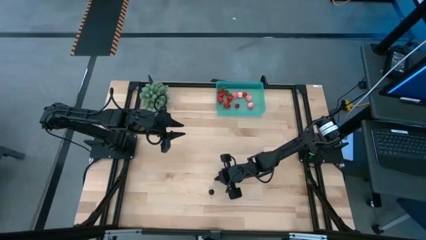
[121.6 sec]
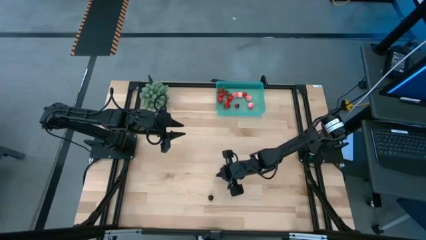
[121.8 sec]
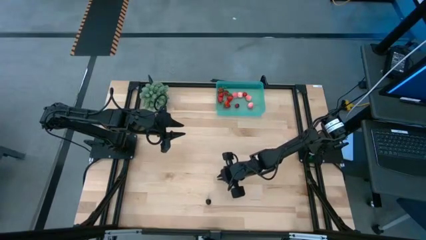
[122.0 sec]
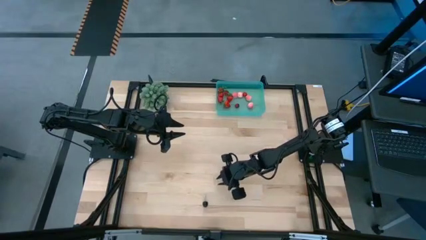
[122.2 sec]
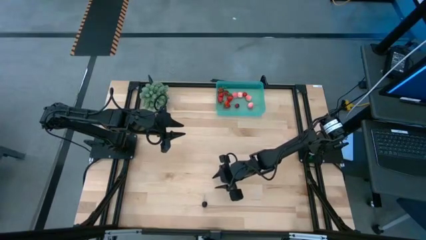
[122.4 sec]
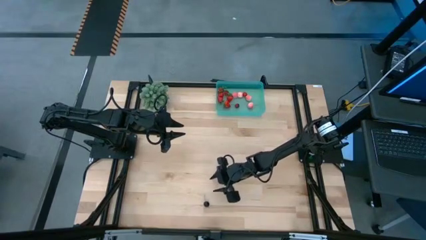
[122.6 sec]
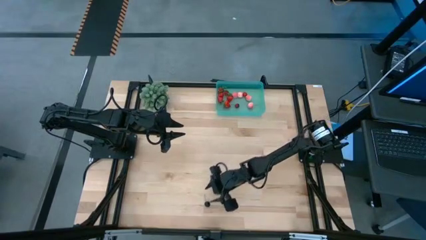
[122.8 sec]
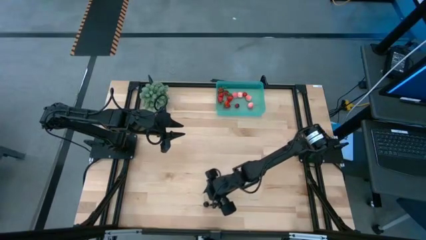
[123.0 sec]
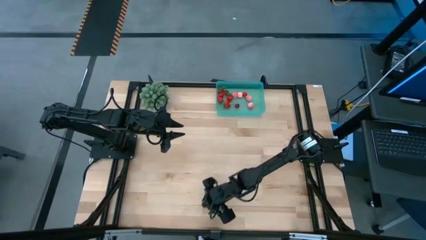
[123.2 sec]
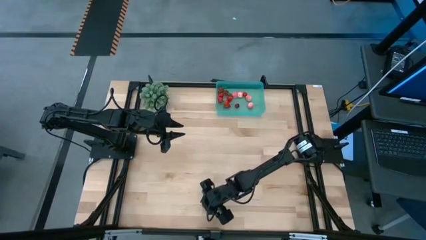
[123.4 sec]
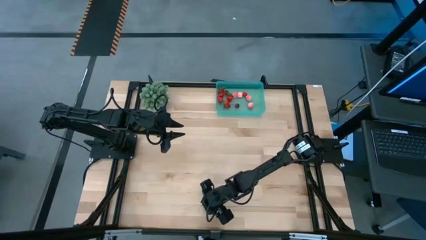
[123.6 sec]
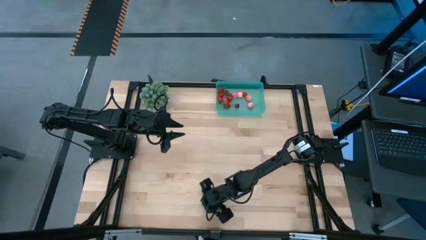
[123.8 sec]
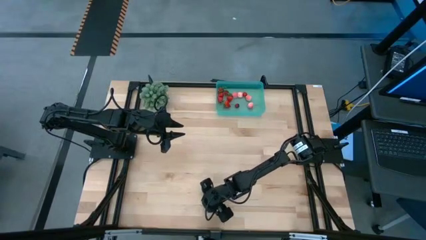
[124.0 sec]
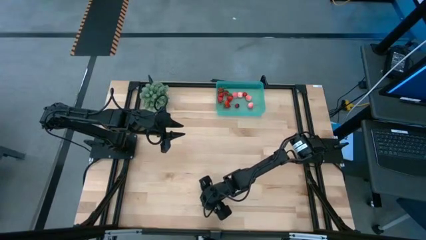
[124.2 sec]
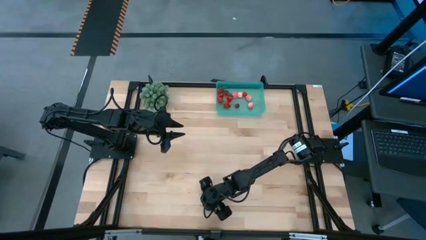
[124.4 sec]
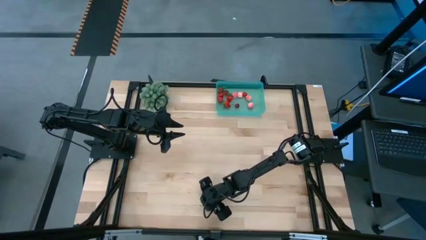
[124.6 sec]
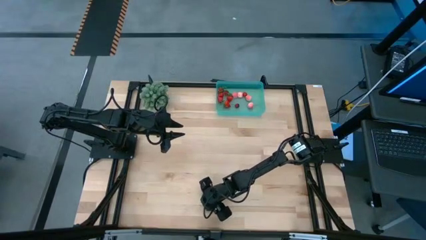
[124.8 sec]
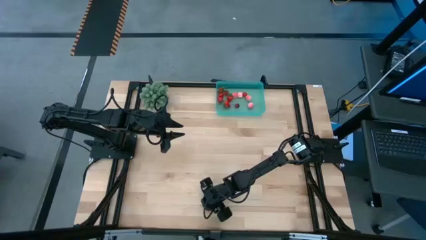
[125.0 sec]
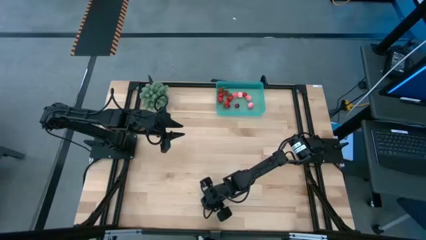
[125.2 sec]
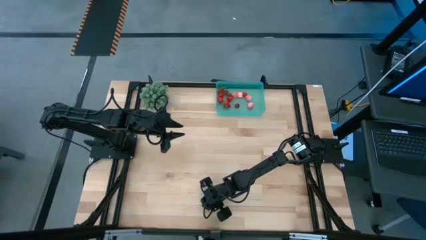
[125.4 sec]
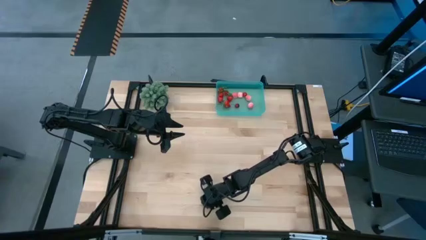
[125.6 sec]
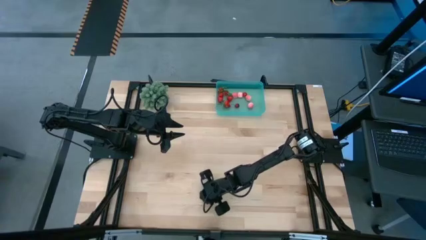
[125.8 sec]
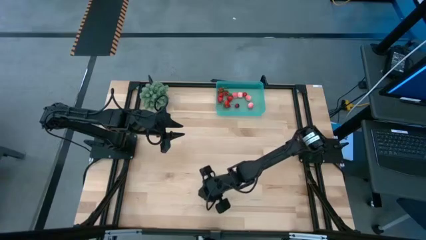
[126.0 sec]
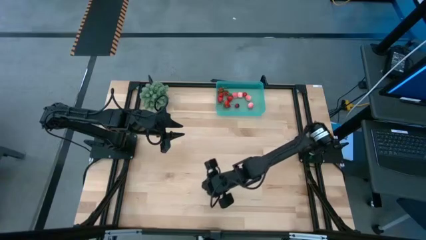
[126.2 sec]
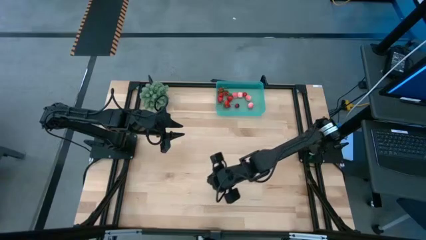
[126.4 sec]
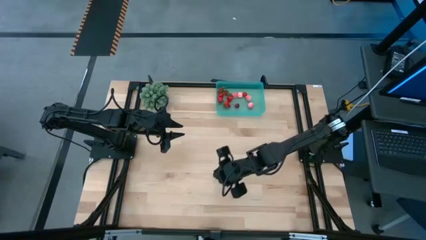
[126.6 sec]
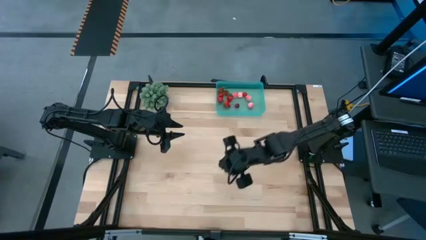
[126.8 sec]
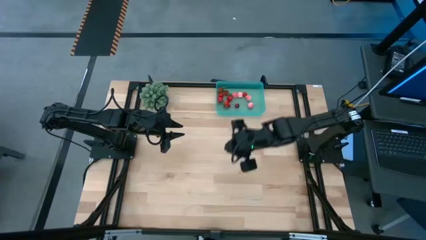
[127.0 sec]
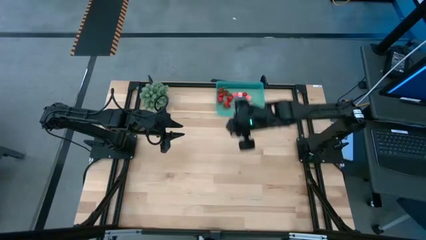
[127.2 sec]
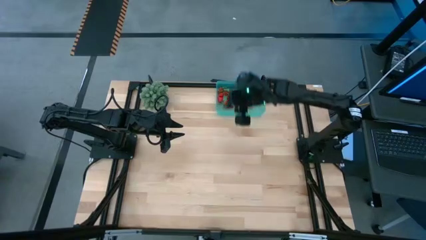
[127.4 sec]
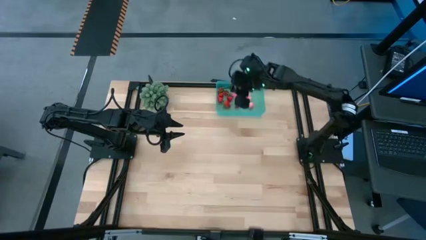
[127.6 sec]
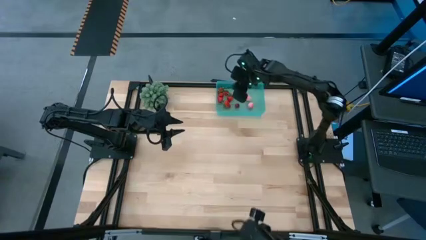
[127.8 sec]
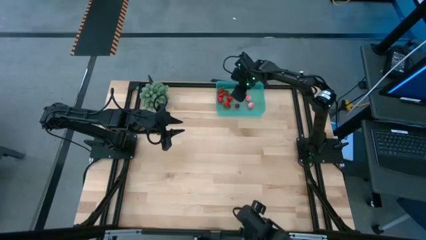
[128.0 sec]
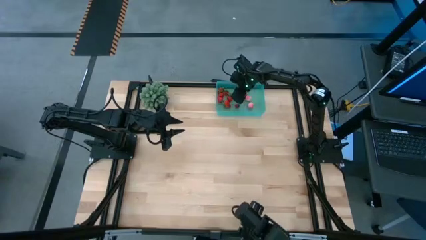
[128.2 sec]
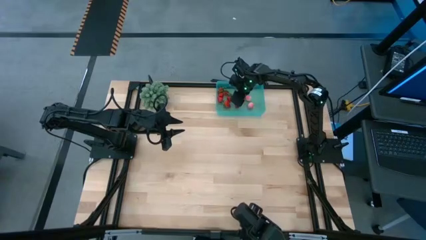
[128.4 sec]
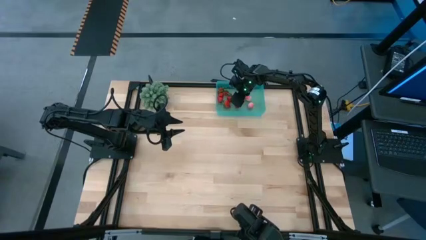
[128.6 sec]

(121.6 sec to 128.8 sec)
Task: Pick and placing Produce into tupperware
Put the cherry into the blue bin

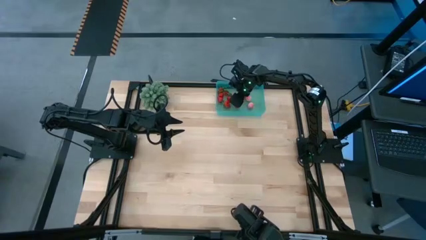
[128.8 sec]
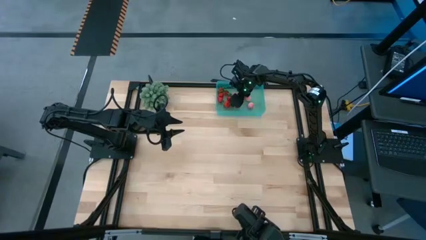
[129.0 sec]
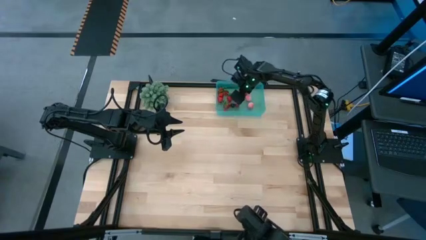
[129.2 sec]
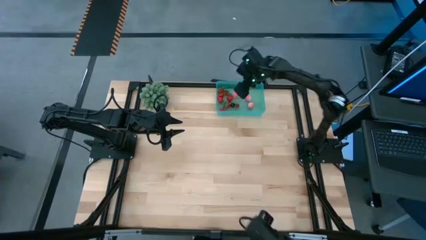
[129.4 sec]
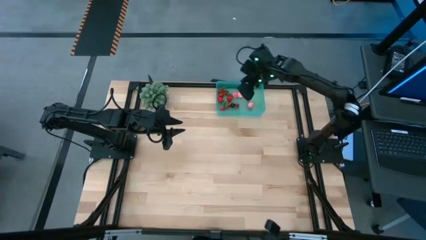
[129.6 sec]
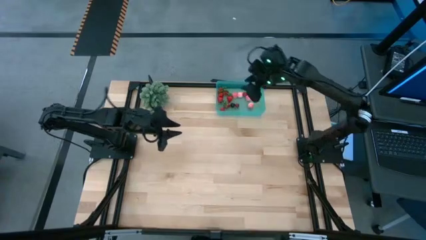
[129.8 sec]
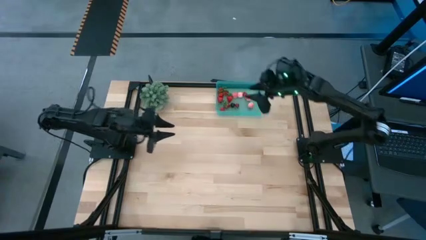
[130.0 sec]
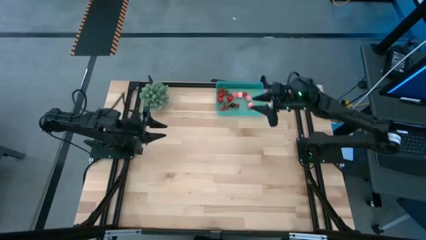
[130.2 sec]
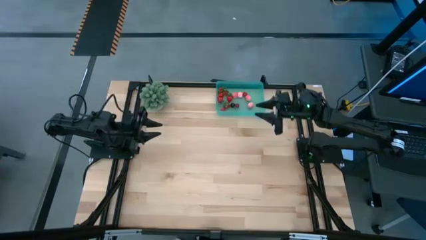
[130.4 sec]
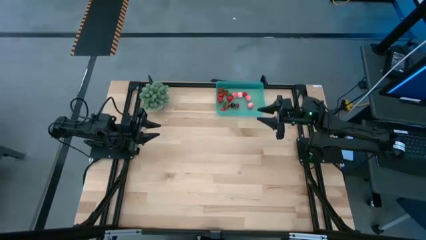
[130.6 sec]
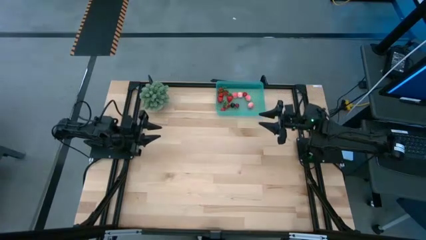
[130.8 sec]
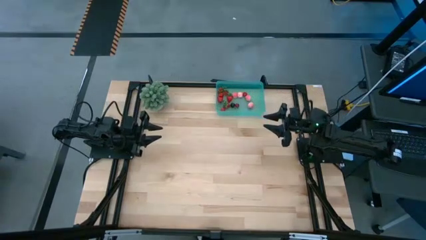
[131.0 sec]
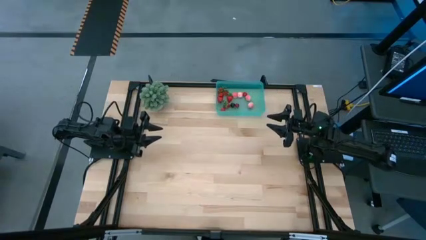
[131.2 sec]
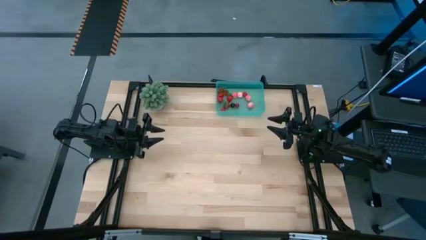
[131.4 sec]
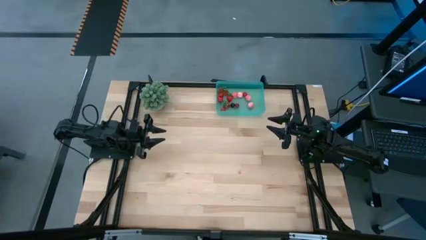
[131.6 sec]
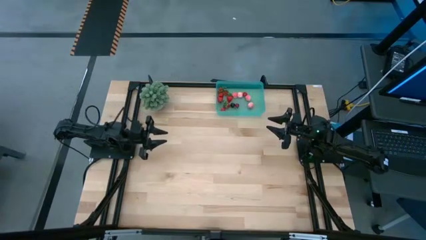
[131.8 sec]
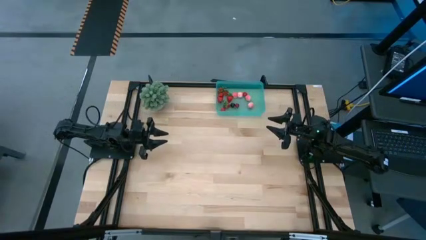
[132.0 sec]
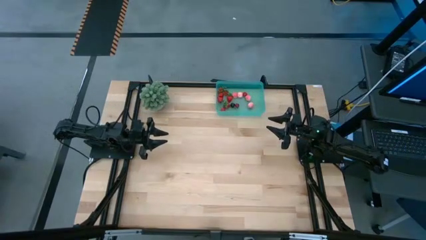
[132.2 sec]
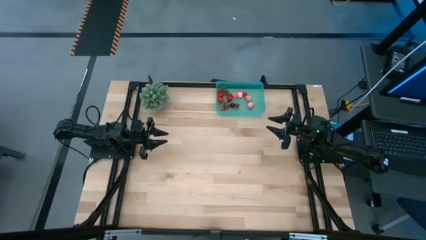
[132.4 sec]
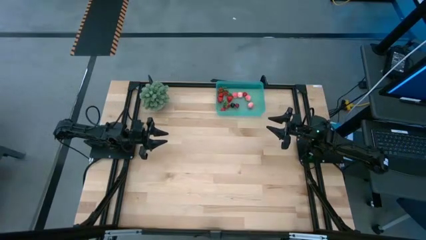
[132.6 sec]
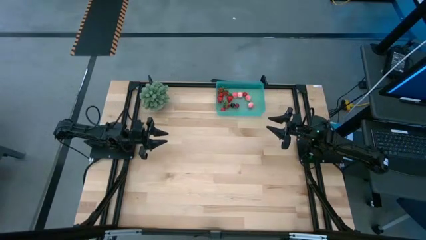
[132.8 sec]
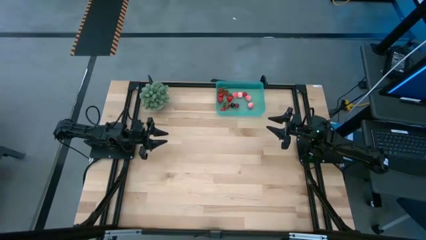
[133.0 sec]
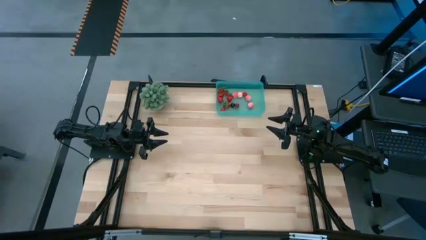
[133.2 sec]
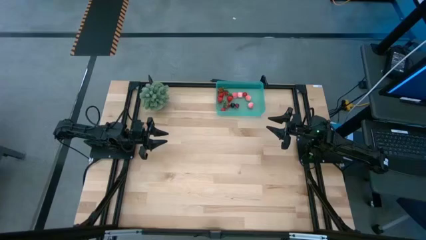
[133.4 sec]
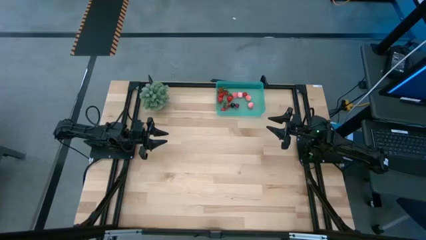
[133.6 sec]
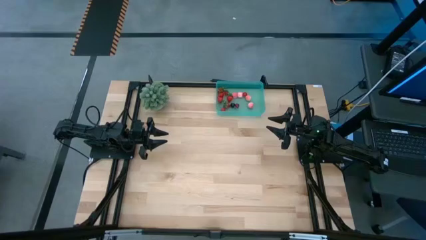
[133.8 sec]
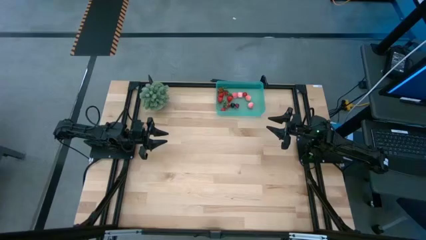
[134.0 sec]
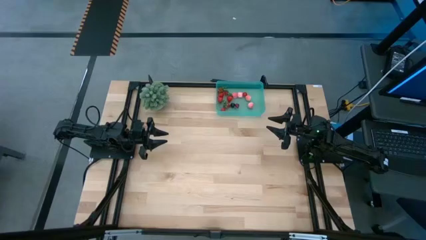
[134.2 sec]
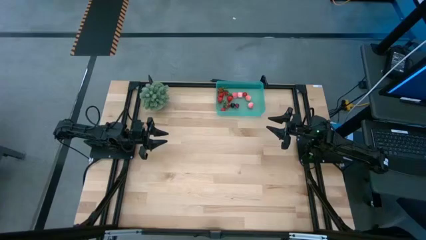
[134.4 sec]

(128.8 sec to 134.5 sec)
Return to Home Position

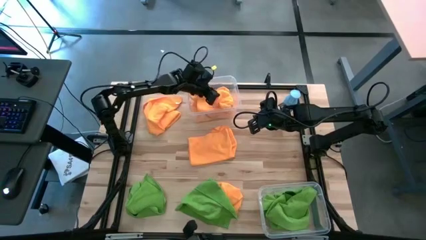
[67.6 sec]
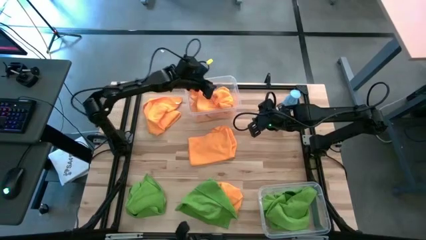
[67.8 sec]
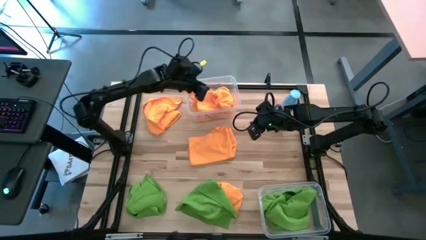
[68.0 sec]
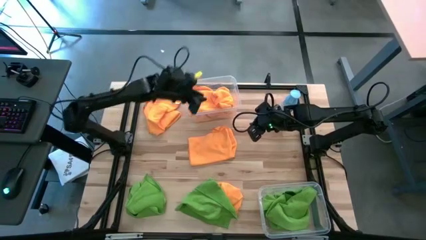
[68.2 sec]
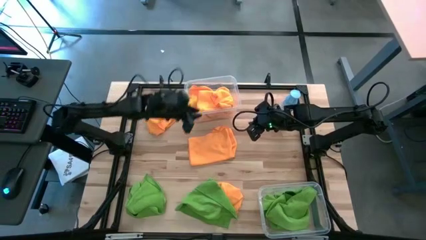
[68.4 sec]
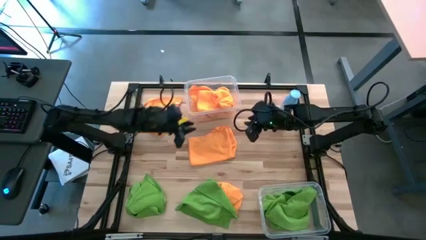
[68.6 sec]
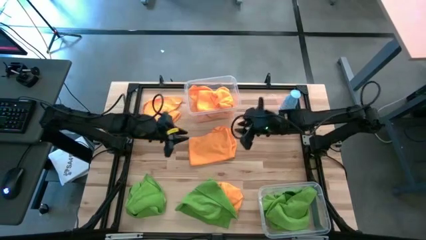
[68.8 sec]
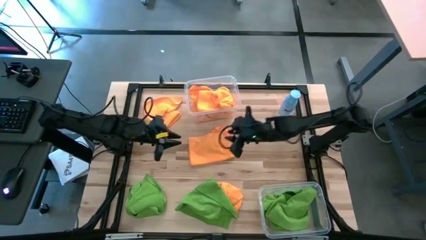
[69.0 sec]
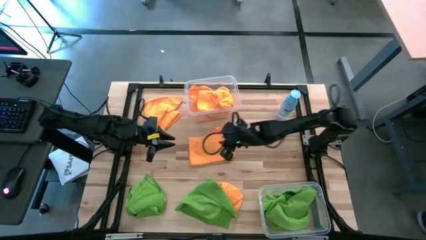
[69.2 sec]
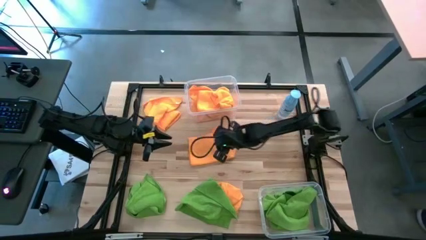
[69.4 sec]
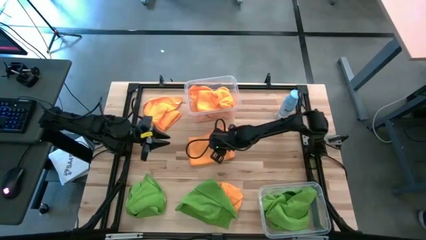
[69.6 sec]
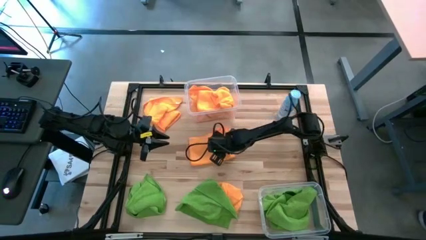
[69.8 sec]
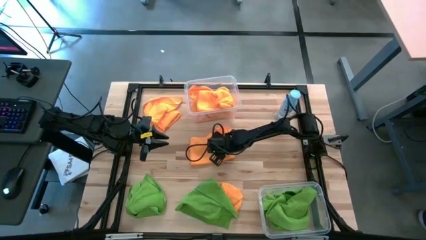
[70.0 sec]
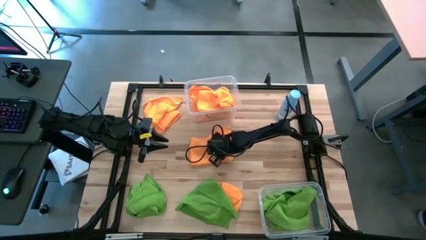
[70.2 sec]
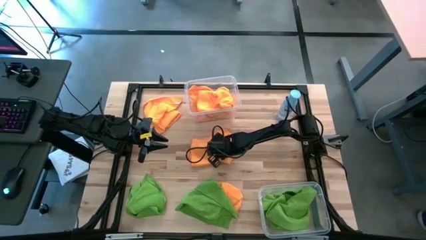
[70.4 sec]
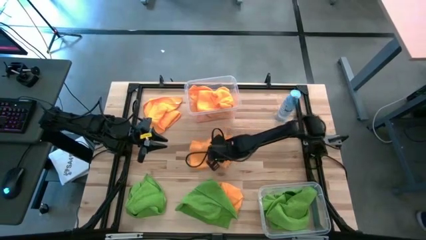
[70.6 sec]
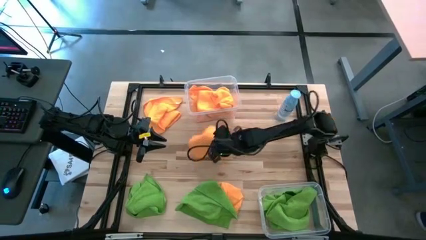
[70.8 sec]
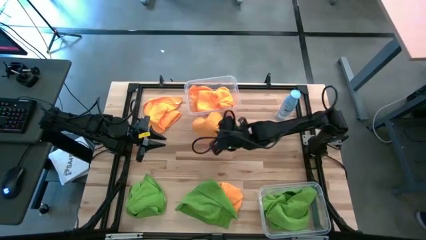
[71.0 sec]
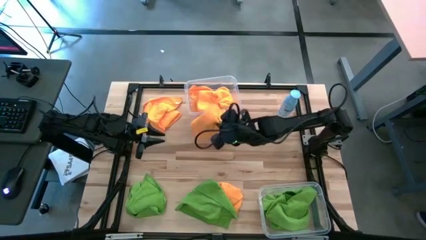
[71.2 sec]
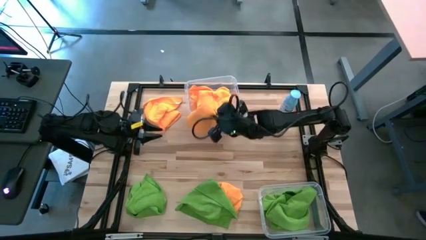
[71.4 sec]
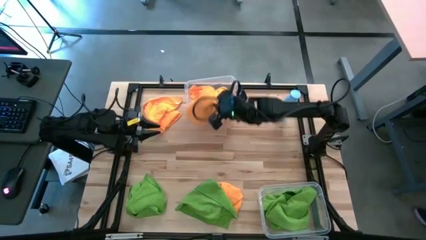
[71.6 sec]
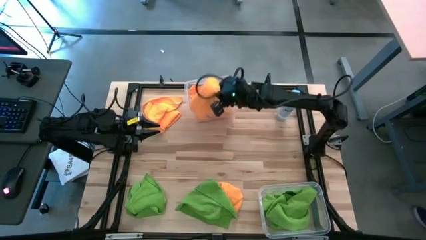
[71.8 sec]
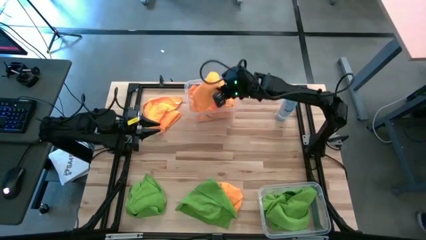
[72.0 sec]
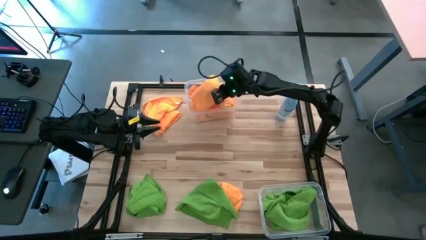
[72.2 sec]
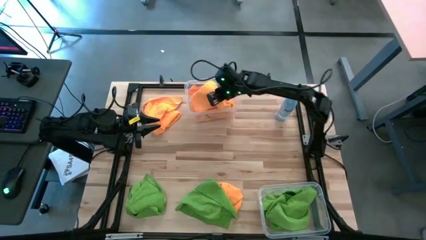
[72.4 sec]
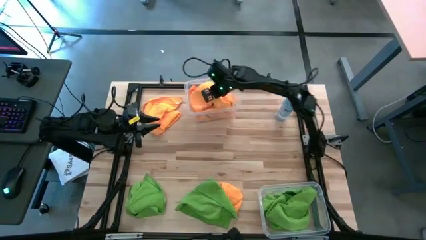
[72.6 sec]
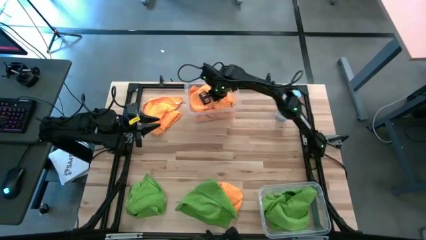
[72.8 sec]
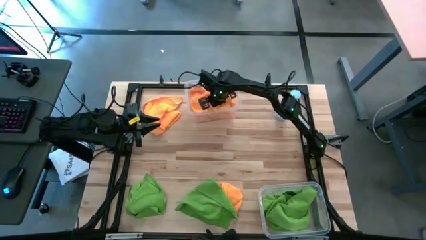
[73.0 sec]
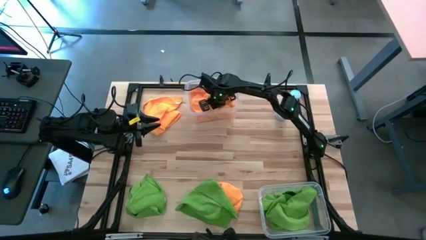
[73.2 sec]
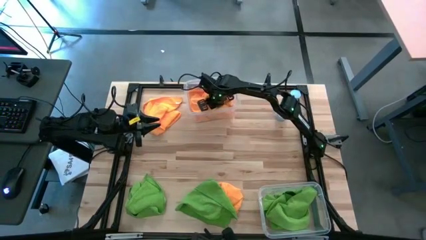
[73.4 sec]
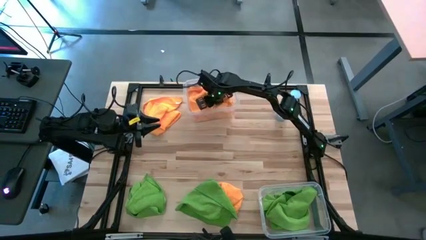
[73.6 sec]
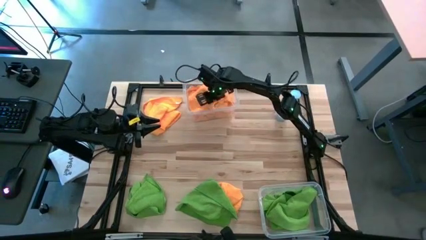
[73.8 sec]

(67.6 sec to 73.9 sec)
Task: Sort microfiber towel by color & place in baskets
Put the orange microfiber towel into the top transparent bin
